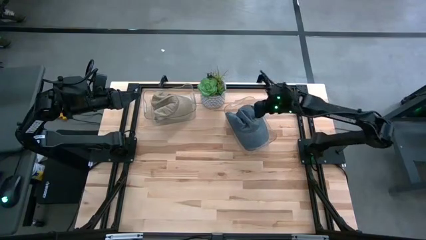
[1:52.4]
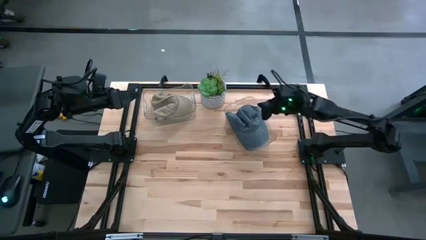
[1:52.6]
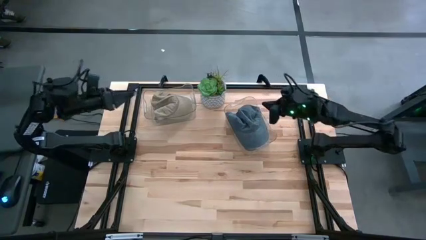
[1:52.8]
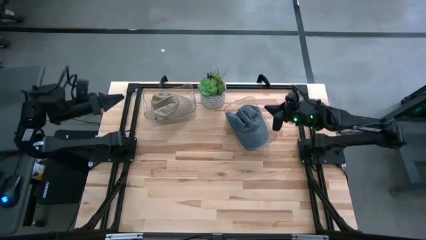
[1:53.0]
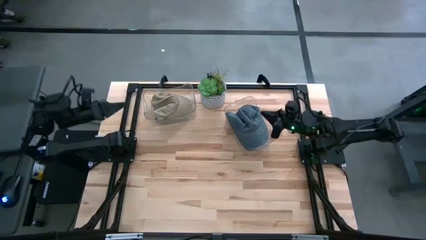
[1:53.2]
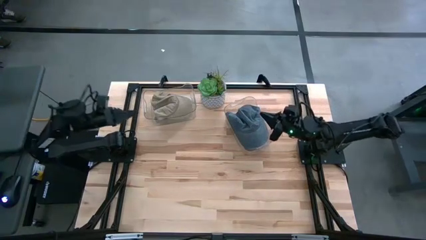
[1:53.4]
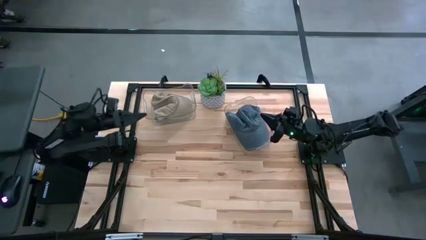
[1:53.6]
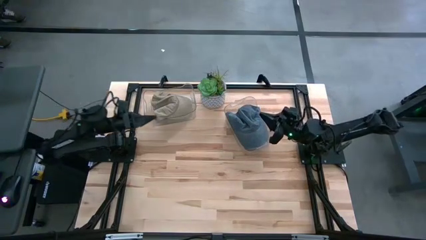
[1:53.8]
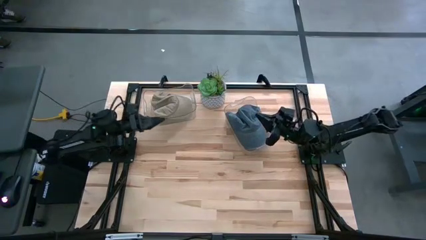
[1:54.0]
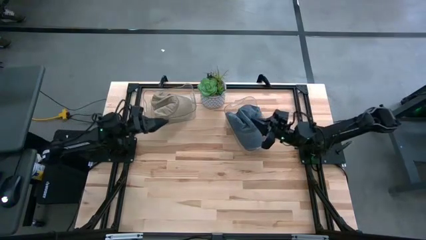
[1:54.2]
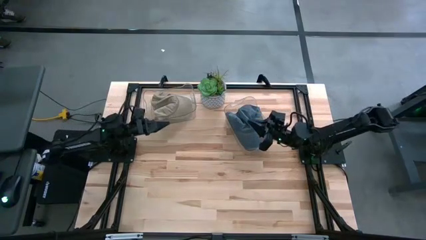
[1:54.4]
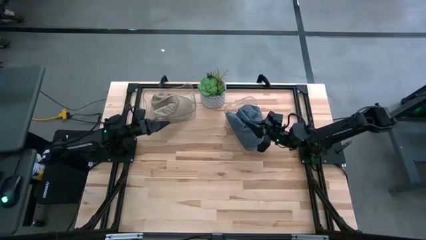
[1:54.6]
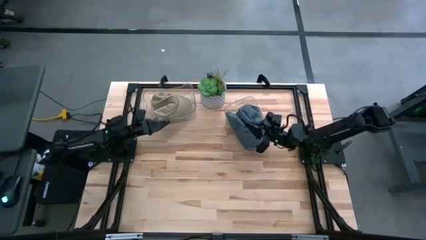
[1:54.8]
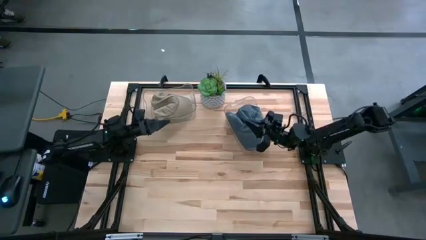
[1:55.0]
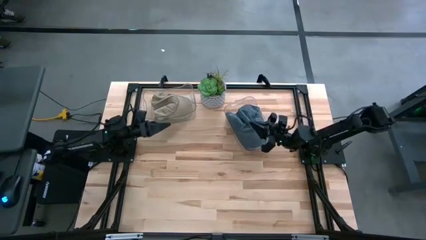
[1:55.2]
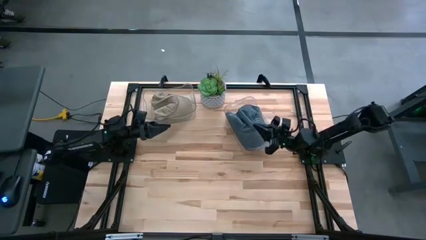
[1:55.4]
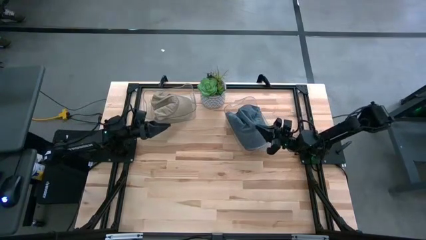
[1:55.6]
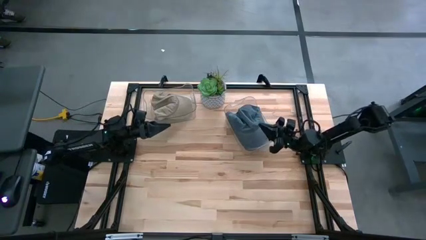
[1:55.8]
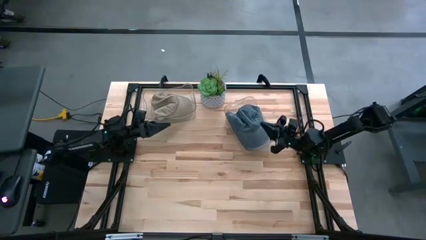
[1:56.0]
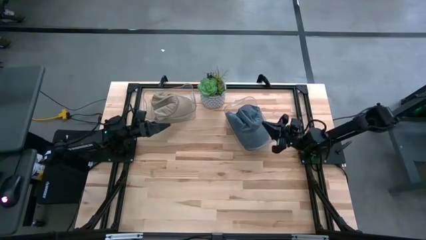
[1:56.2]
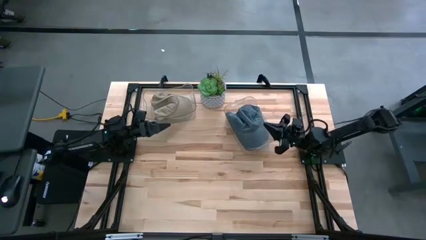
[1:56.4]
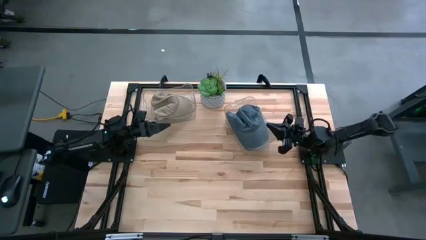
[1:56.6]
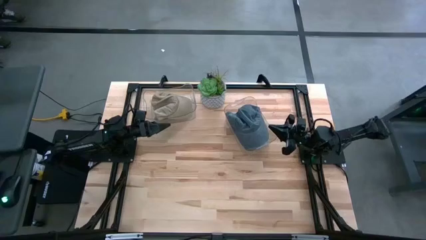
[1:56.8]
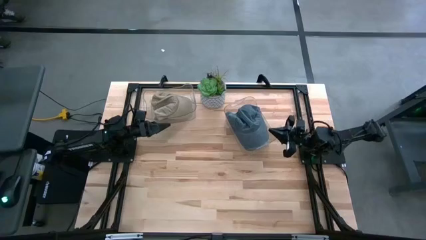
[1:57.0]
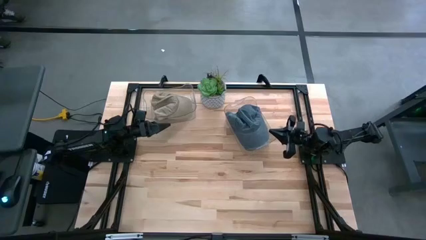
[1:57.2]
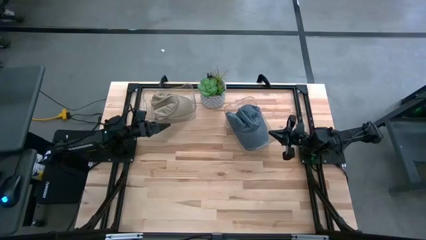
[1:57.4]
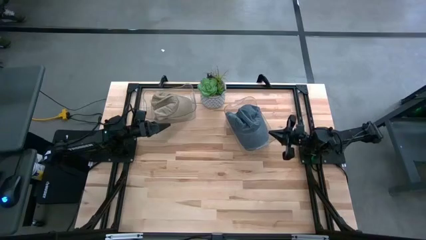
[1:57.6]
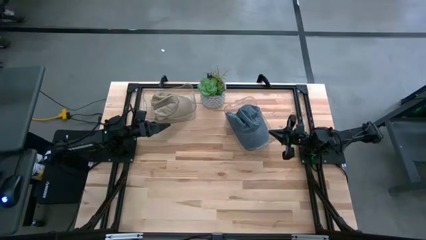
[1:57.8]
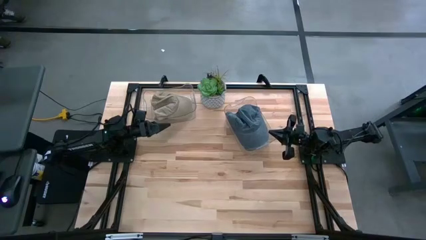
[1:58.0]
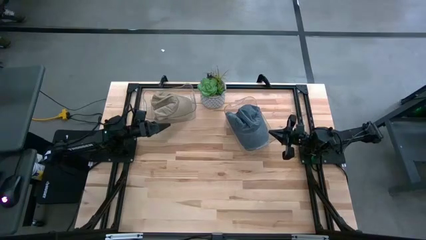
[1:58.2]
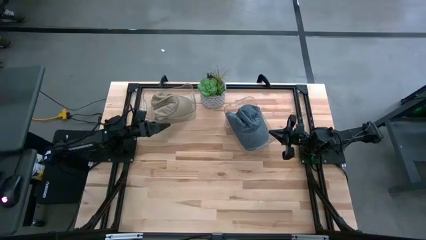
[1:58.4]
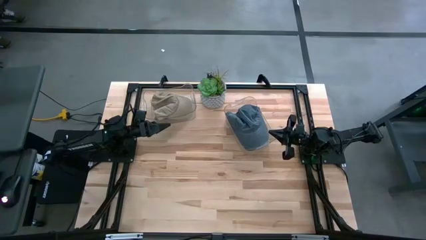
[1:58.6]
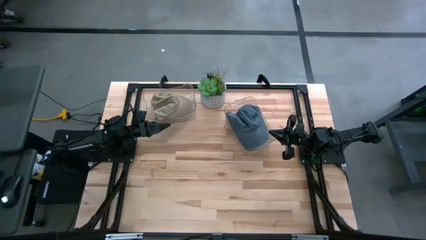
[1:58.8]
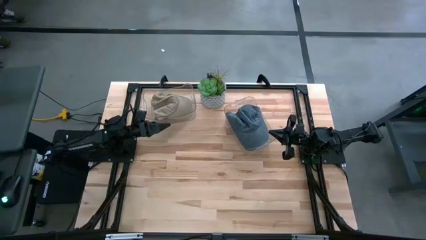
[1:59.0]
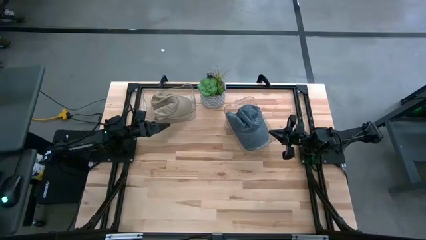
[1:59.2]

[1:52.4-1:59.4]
Task: Pick & Place hat
Return to Home Position

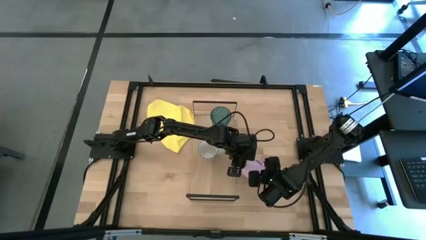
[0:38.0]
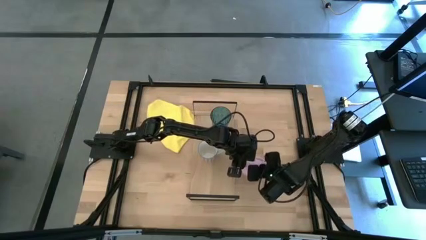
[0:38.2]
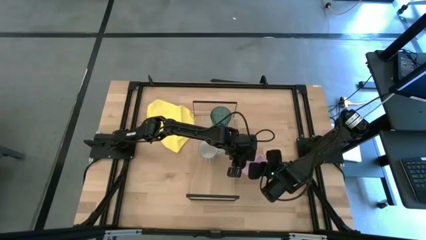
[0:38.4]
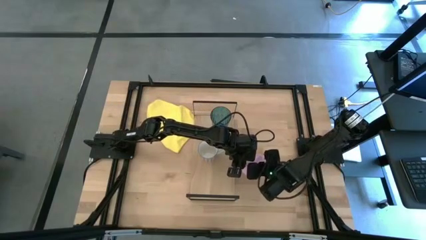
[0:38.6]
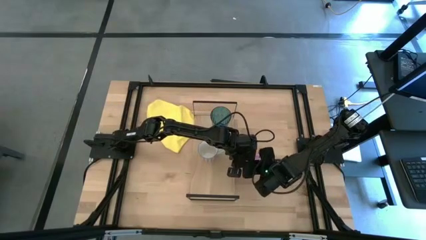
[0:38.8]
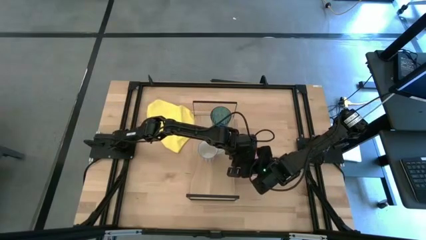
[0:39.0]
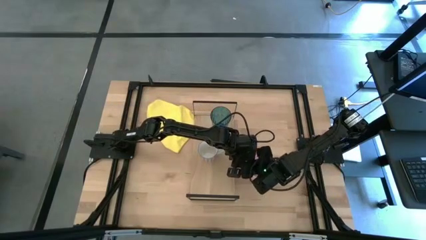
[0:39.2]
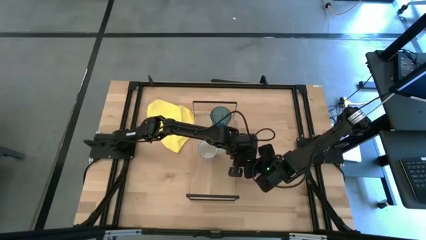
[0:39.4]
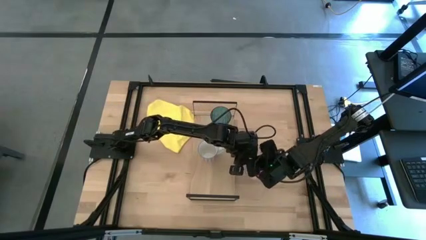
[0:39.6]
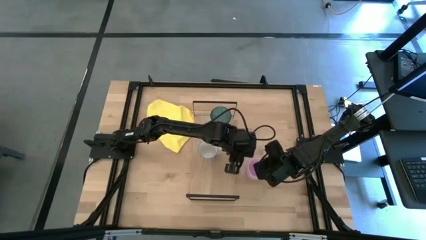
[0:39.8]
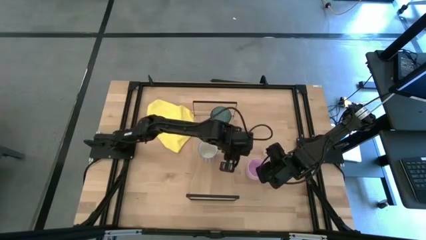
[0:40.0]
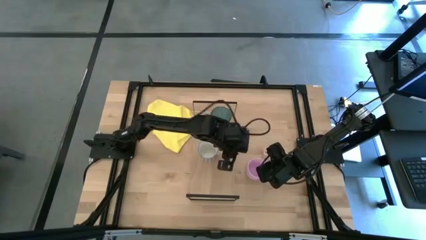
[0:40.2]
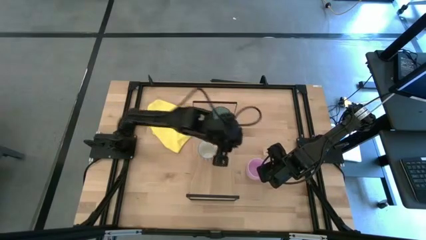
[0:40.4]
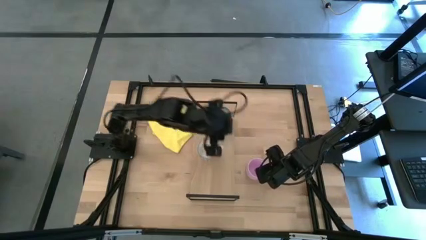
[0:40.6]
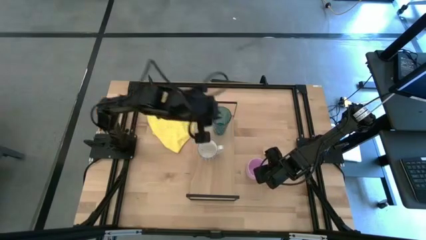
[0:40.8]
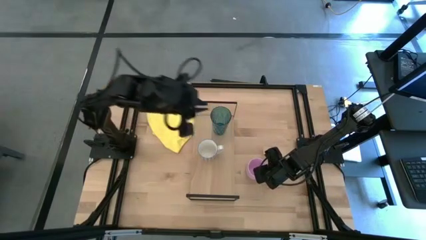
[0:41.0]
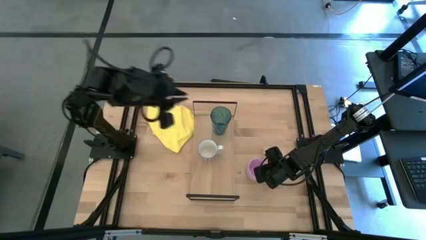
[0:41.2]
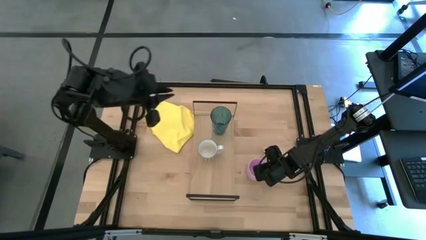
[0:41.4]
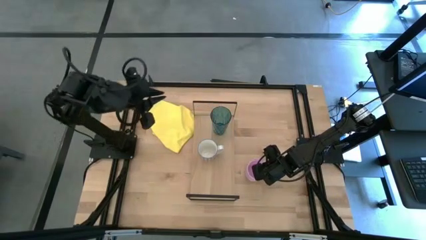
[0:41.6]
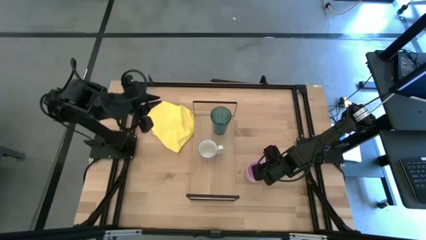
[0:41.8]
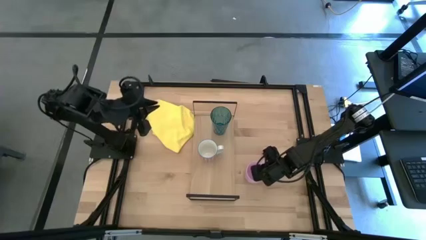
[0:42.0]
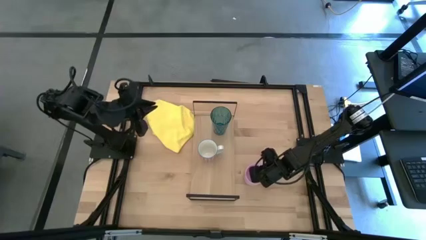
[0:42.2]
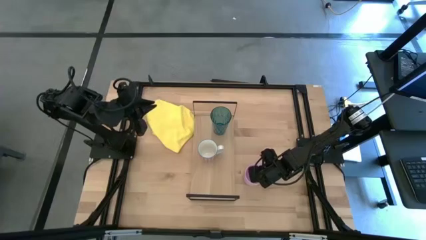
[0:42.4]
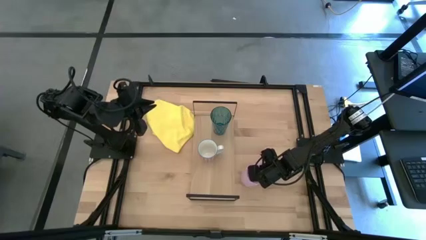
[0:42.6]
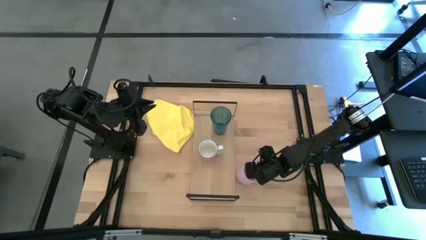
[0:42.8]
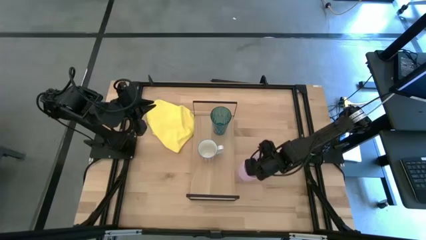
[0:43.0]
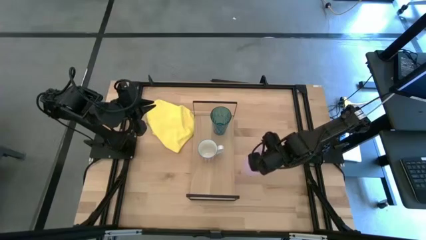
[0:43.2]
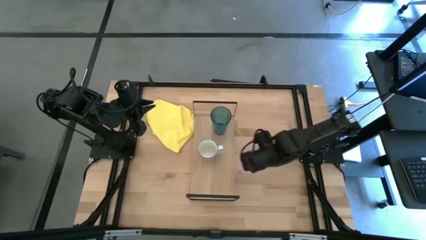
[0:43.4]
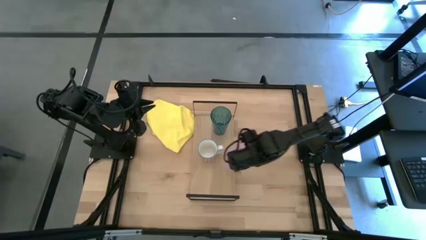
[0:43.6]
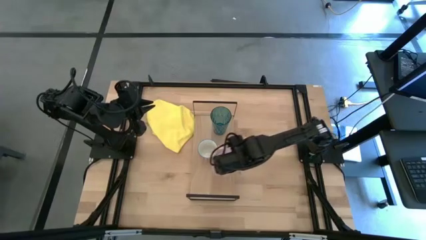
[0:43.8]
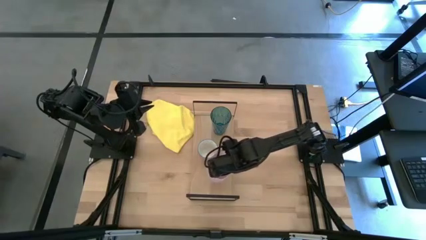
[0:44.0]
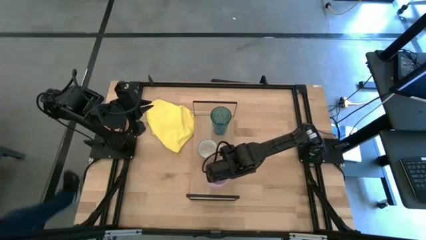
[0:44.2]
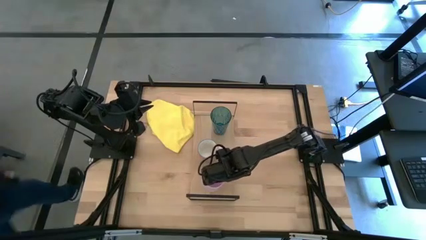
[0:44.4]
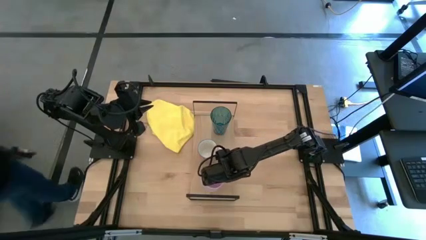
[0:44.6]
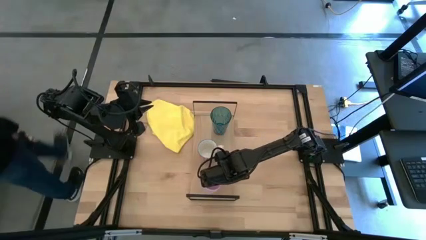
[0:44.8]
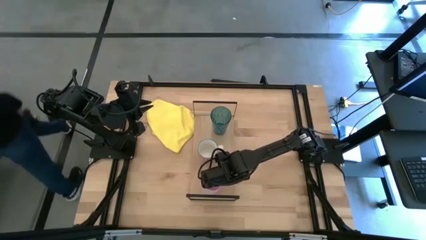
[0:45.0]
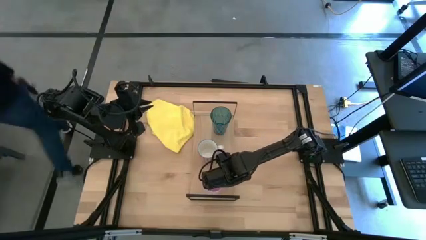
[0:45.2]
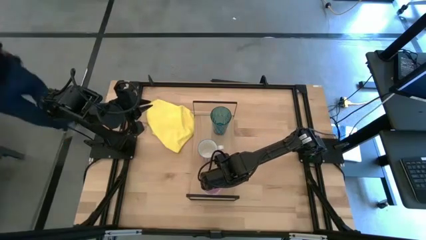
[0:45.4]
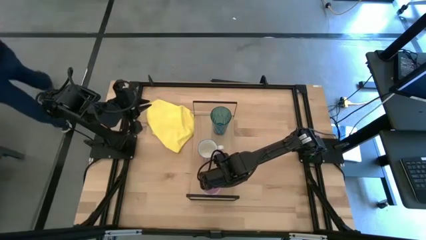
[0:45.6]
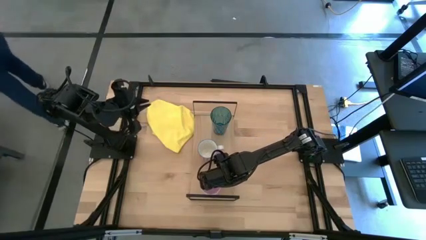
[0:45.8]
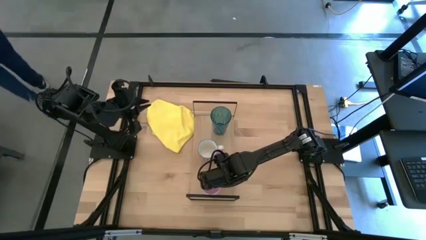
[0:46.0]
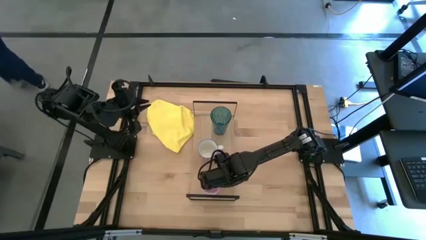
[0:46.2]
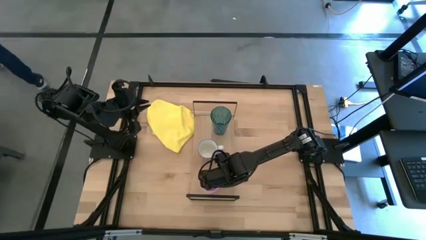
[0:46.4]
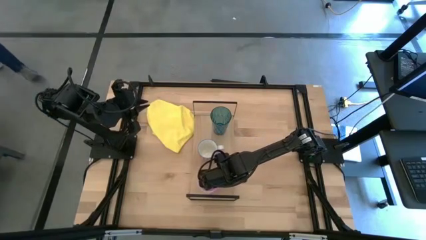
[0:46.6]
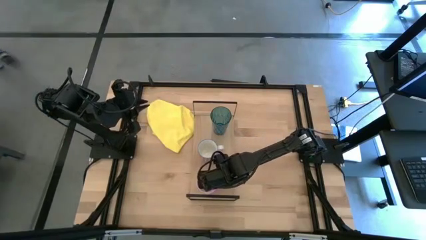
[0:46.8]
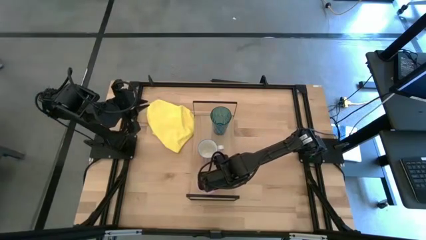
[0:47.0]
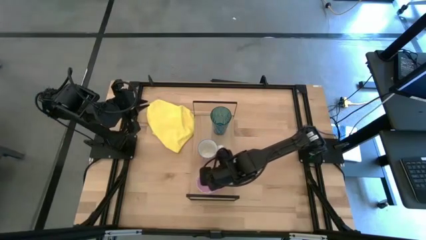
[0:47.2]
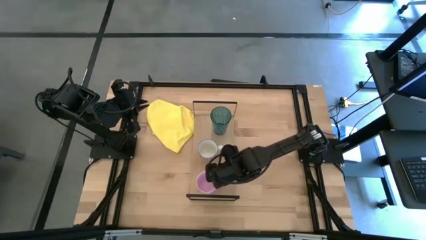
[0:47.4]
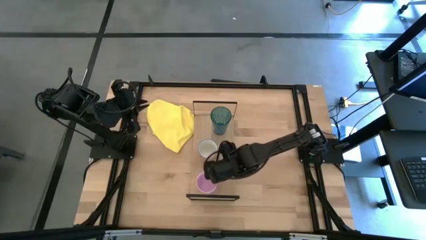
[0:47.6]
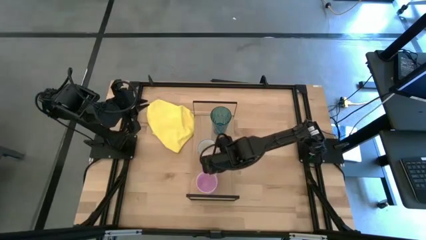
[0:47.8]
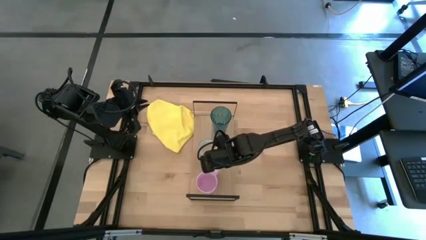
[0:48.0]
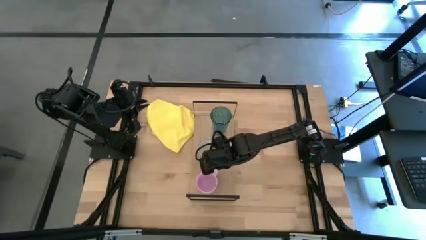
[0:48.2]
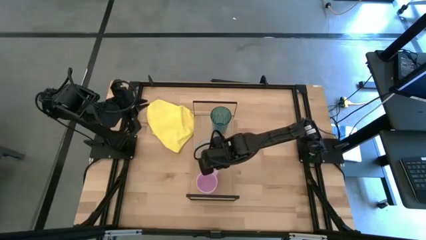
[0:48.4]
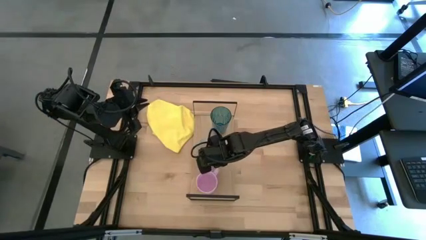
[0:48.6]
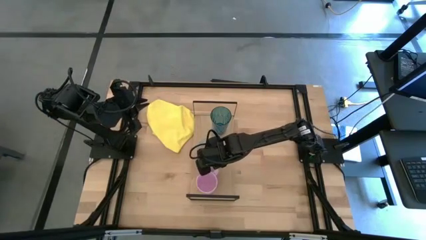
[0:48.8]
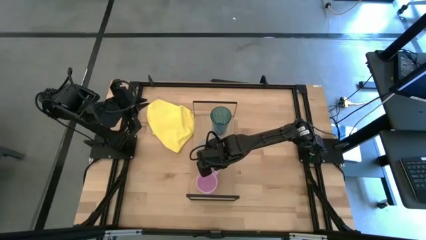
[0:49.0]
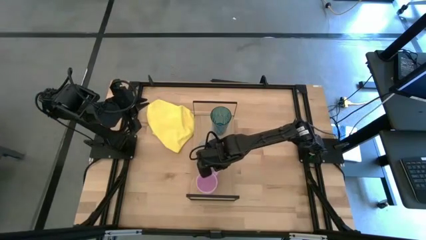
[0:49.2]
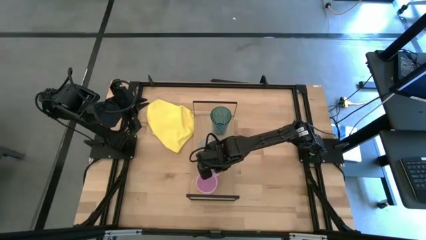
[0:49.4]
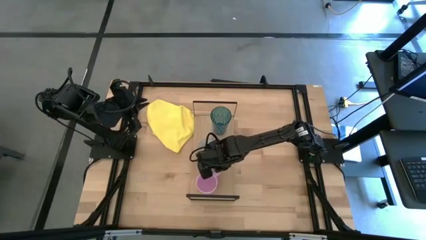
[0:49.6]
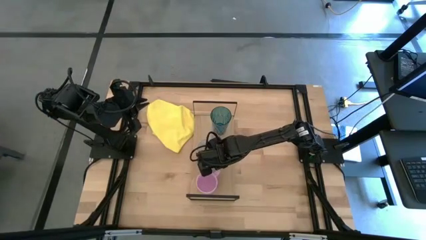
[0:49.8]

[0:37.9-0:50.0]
Task: Stack small to large cups/mugs on shelf
Put the pink mug on the shelf
